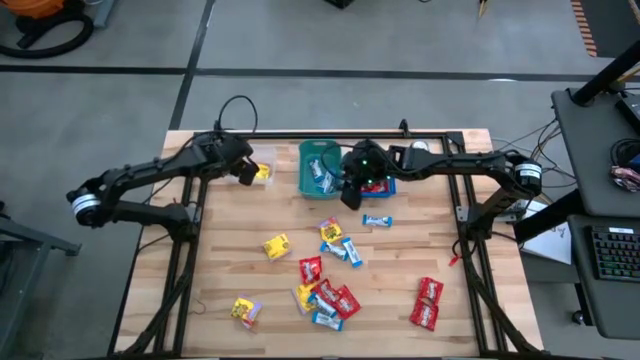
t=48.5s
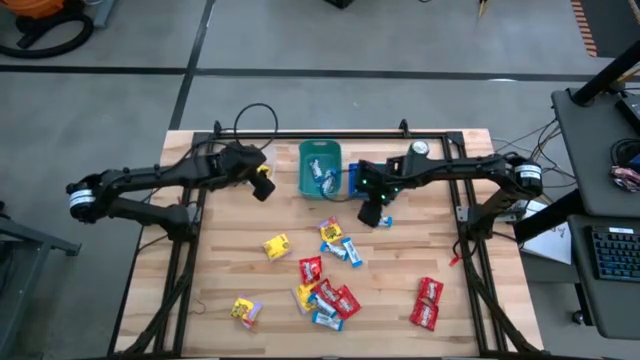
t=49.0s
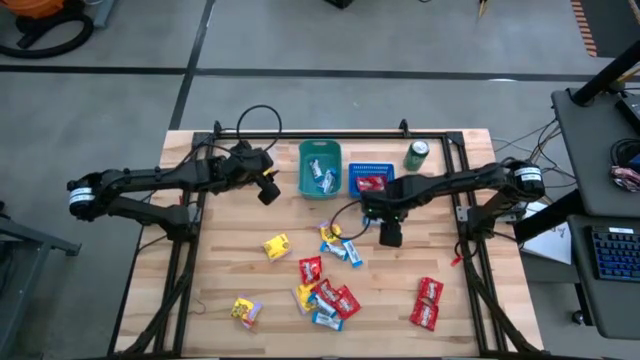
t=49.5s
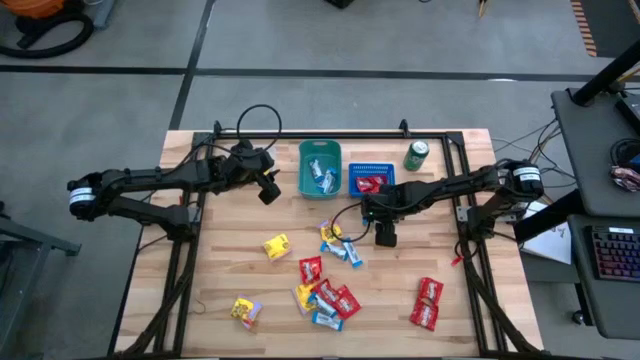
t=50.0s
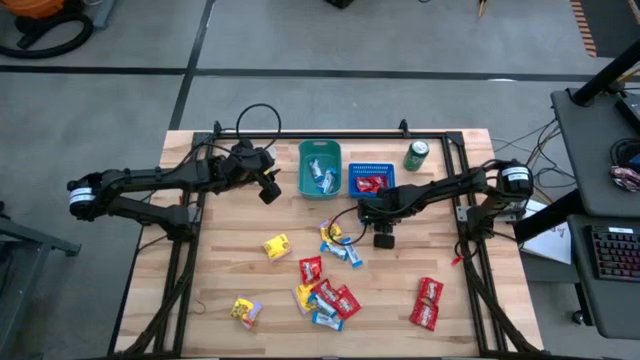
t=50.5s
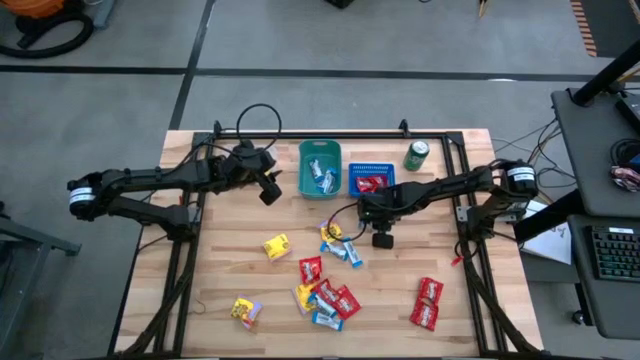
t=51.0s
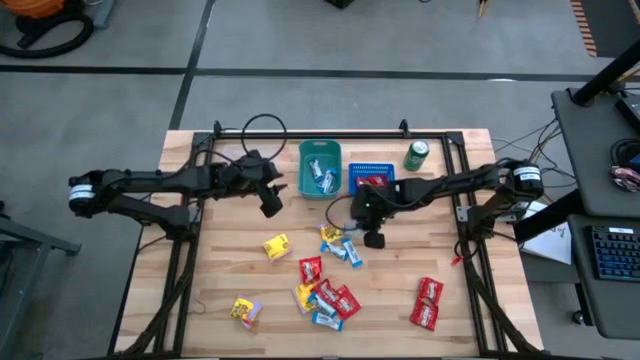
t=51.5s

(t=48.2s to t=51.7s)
Task: Sort candy
Put the white chocolate into the green bin

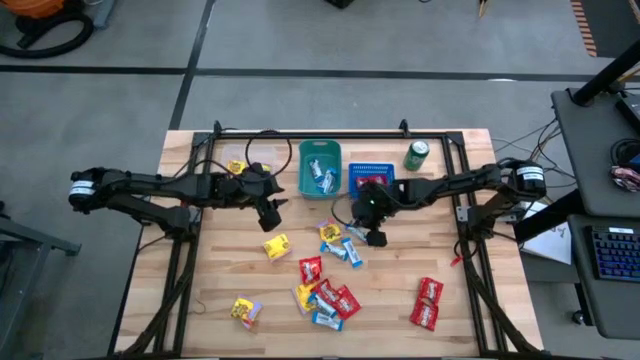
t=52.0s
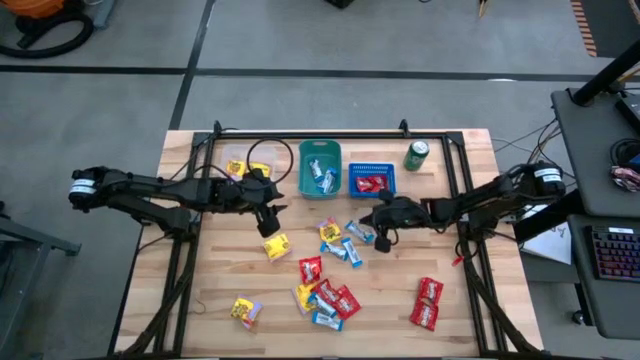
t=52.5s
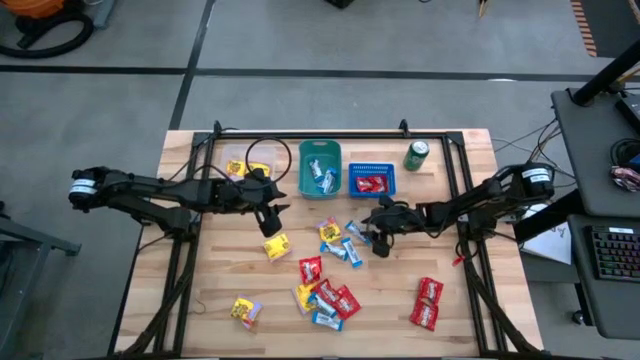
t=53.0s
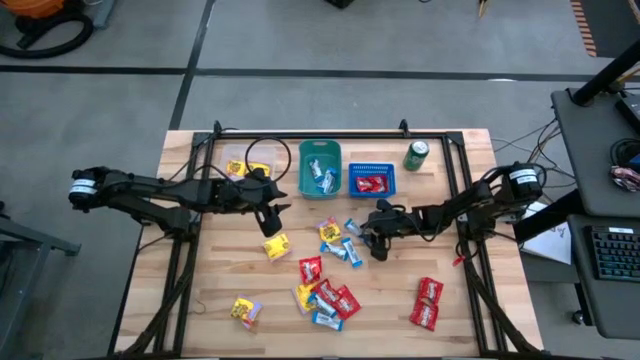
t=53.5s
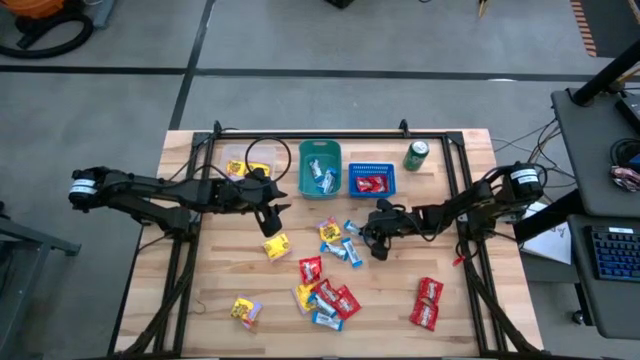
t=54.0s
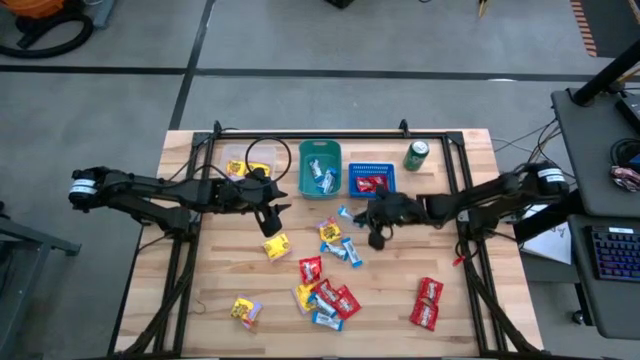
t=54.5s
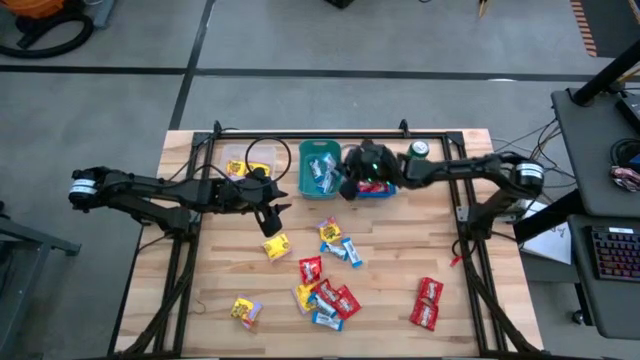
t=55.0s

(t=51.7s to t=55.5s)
Put the white chocolate into the green bin

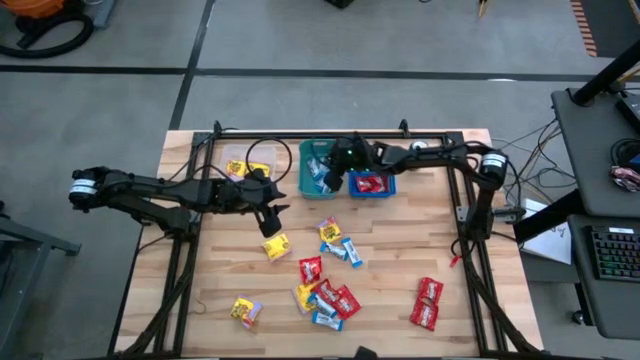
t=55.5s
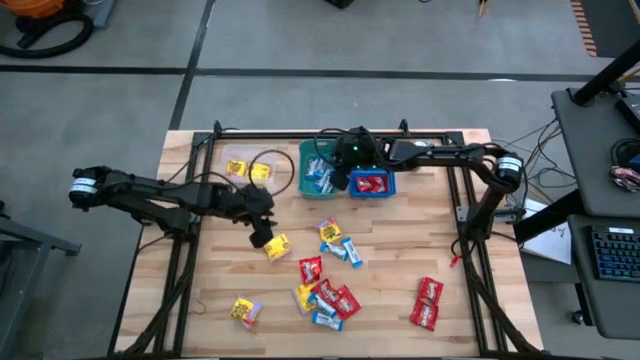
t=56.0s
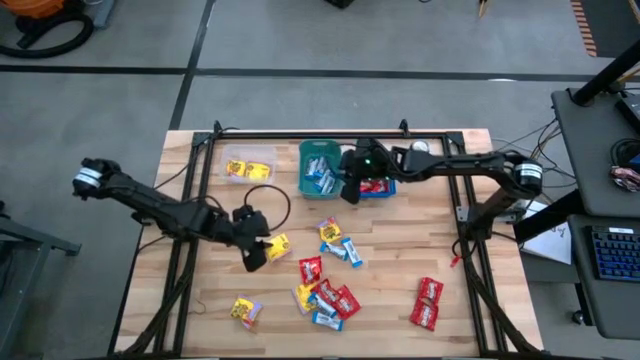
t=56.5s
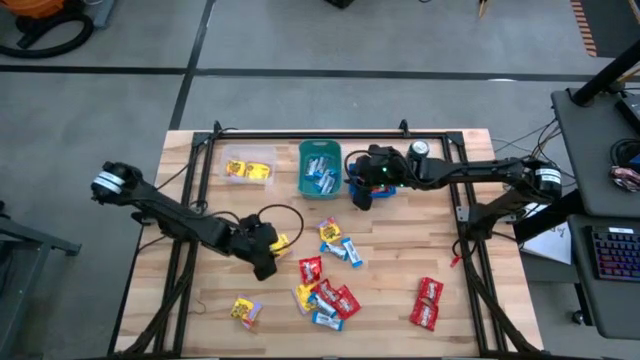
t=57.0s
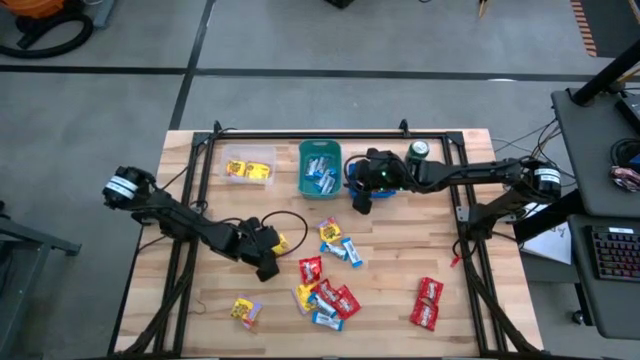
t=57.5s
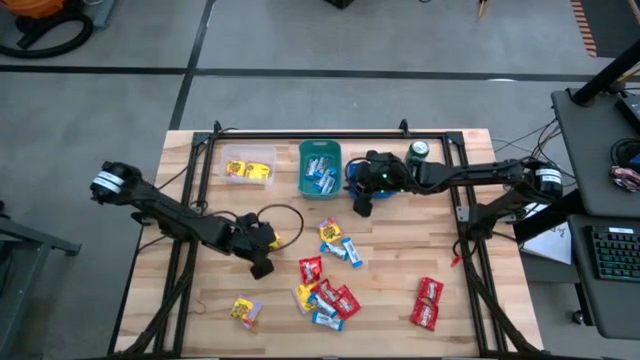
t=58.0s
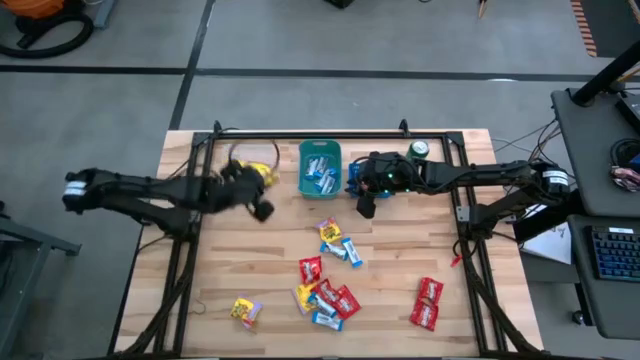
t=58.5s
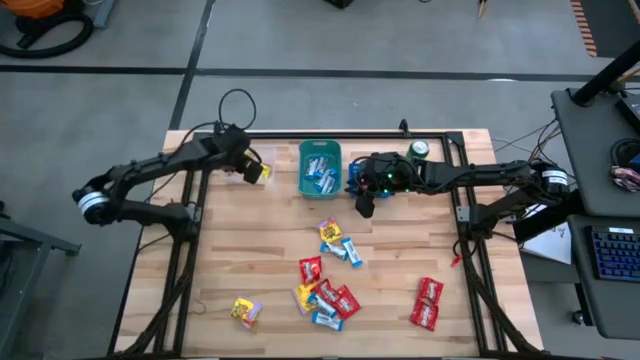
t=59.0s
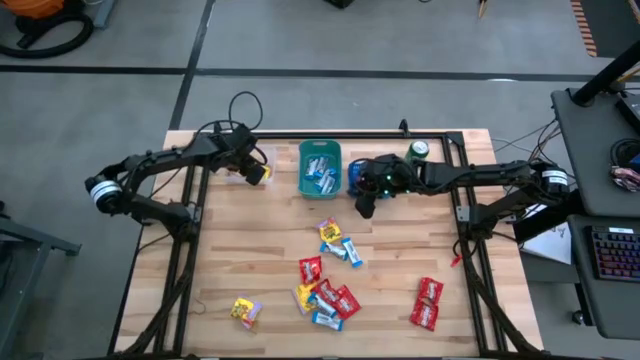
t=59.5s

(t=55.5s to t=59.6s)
Put the yellow candy into the transparent bin

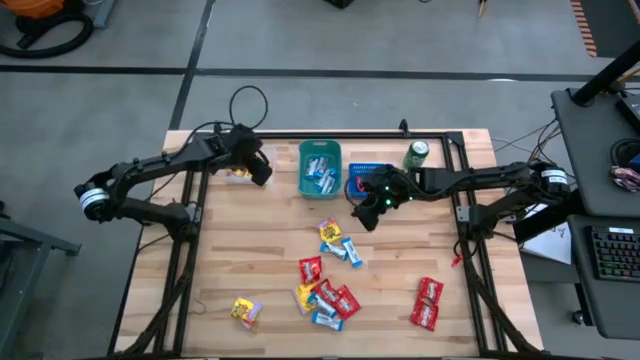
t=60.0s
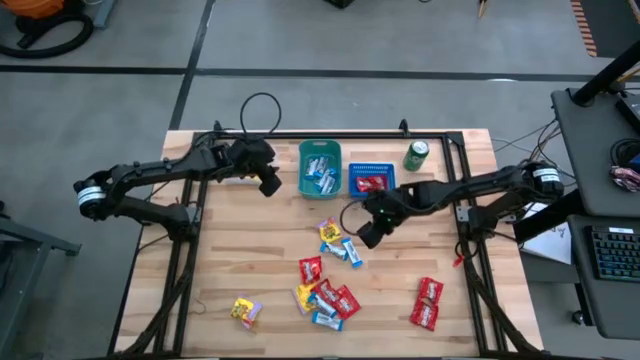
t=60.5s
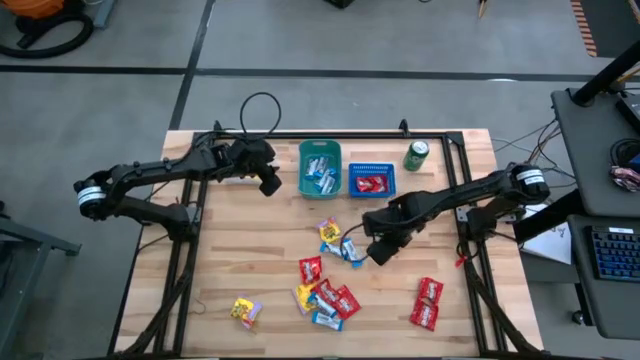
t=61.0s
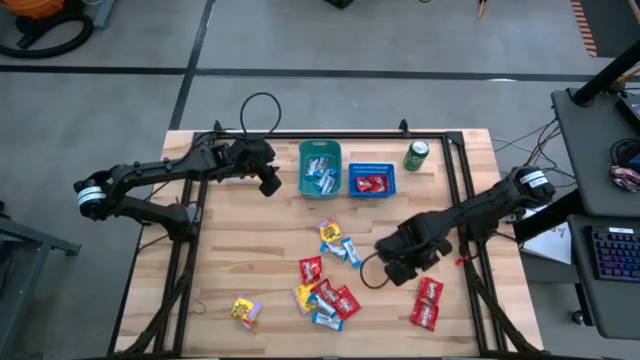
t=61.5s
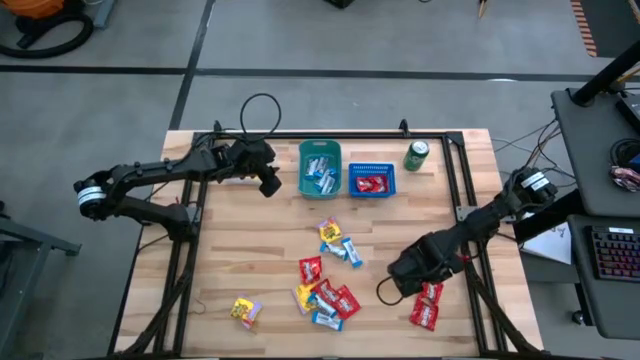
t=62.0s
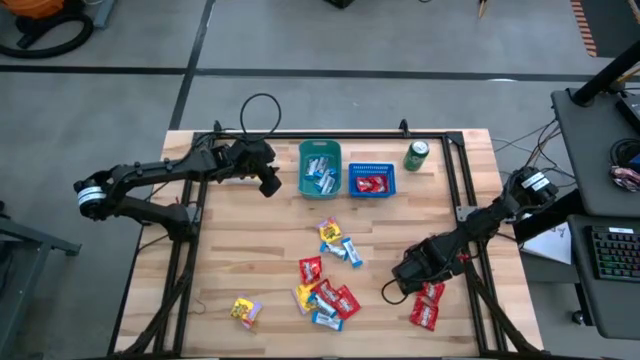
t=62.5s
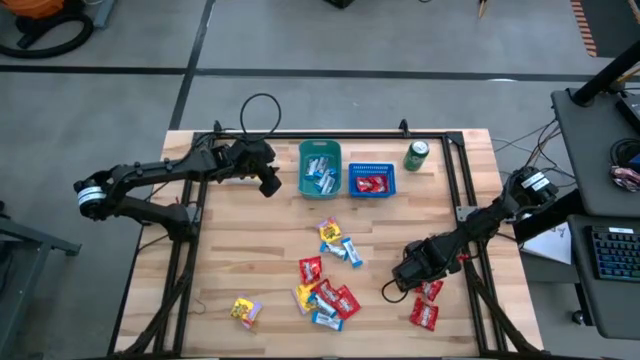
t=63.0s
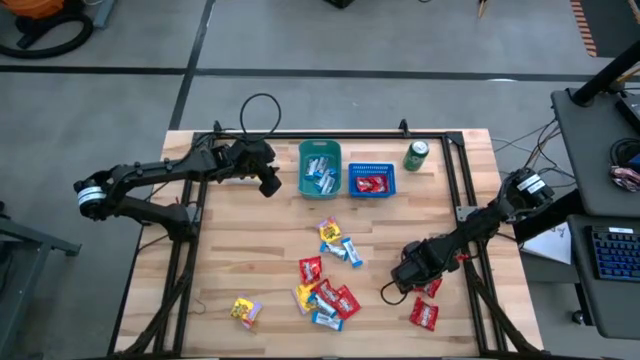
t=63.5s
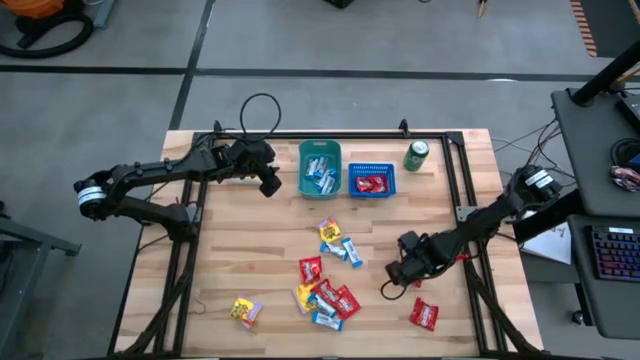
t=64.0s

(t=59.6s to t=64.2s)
Put the red candy into the blue bin

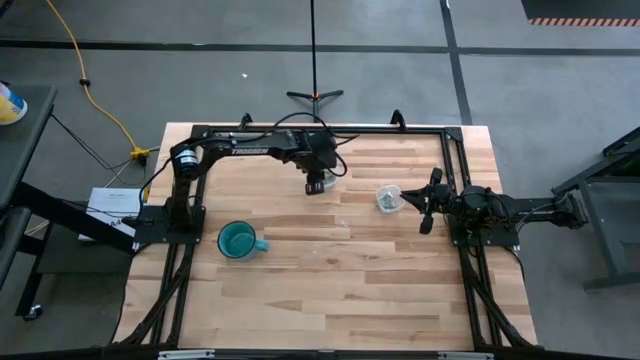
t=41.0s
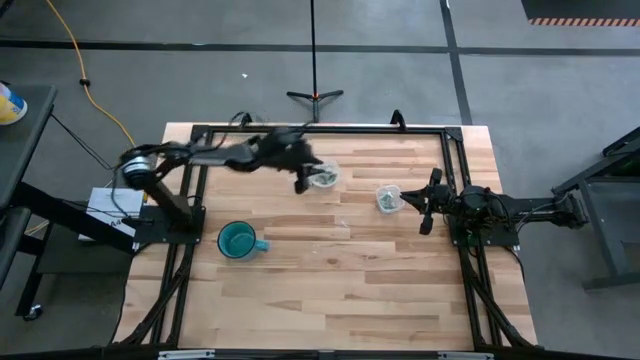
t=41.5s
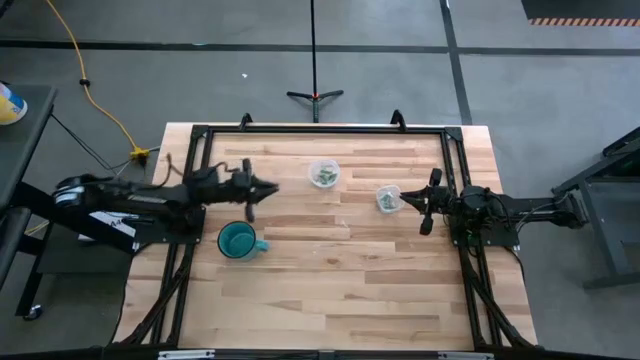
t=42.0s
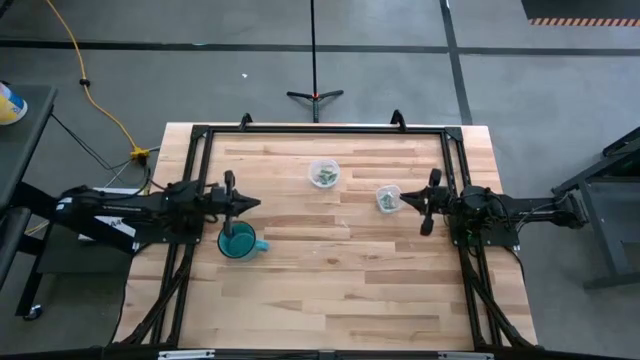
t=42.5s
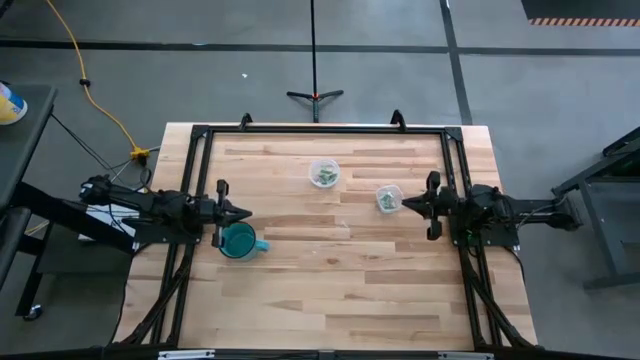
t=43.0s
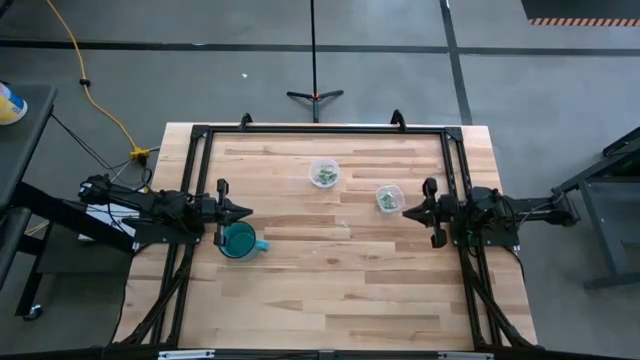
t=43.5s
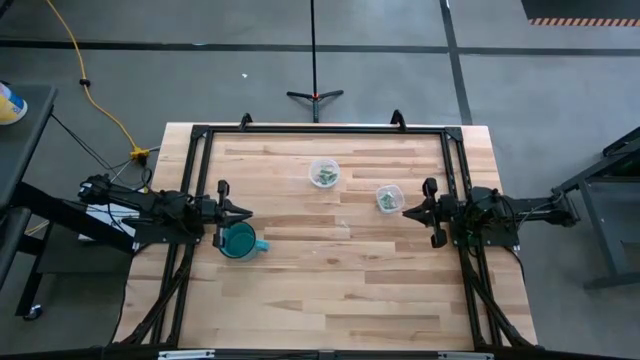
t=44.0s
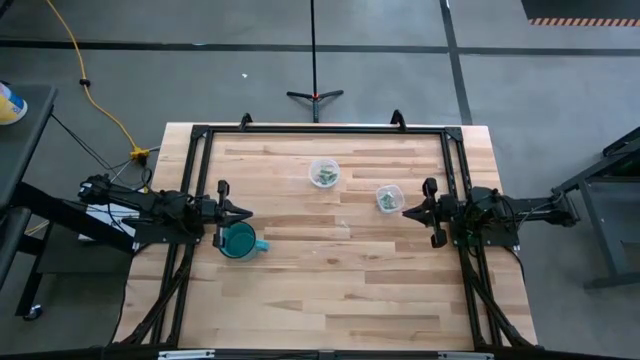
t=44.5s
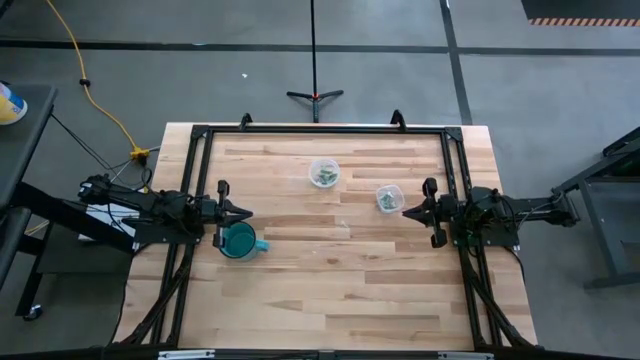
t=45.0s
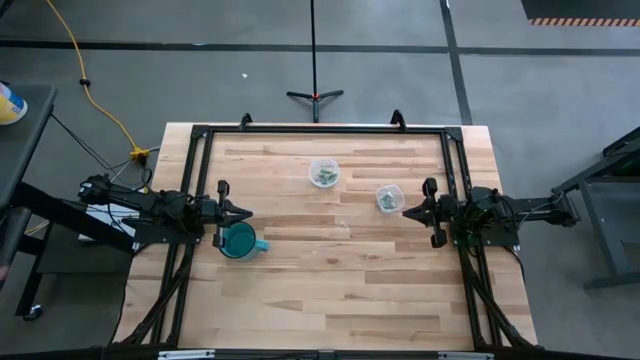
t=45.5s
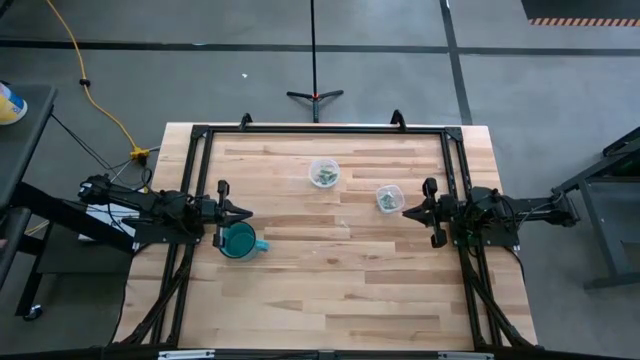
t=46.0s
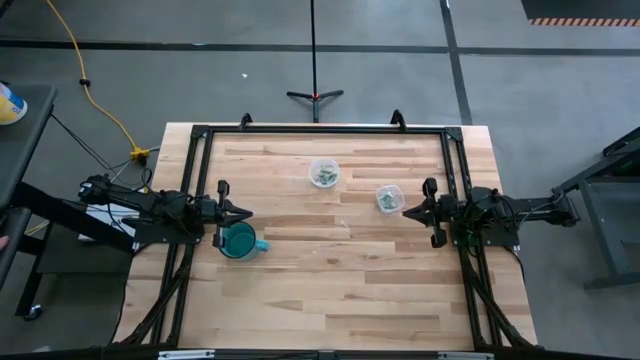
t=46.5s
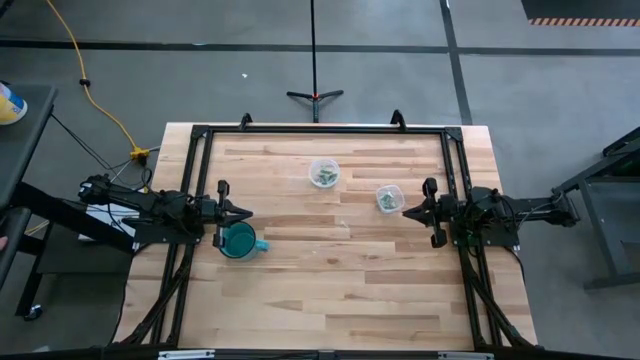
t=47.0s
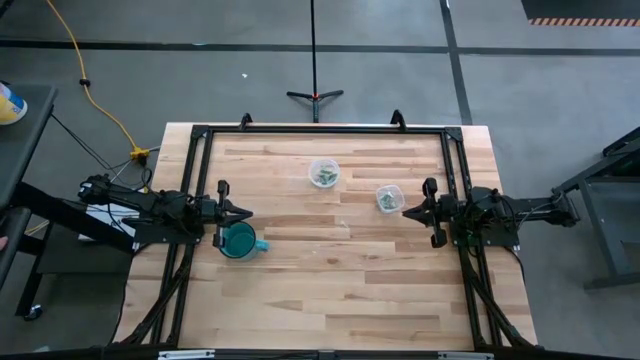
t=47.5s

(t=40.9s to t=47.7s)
Task: Pick and place items into bin
Return to Home Position
